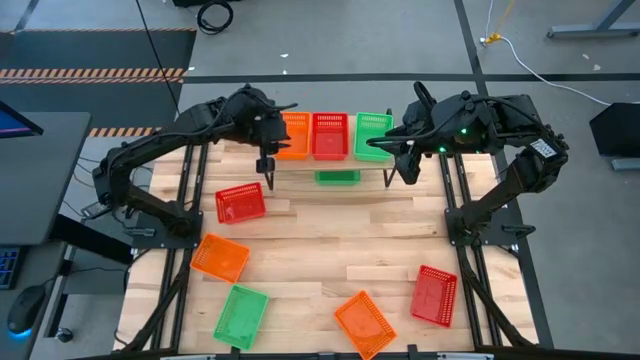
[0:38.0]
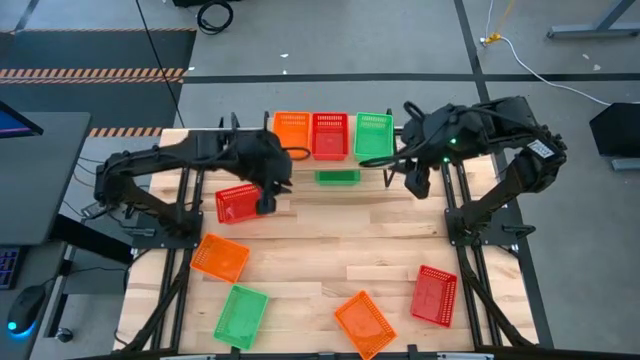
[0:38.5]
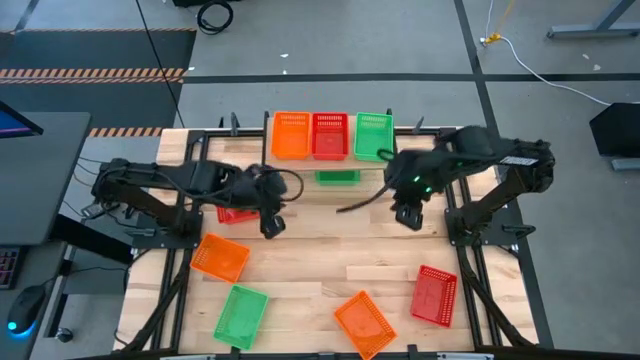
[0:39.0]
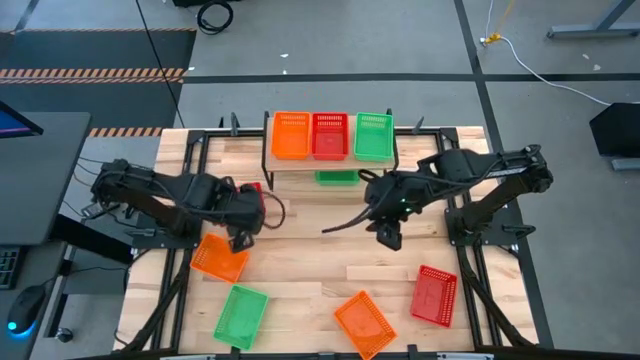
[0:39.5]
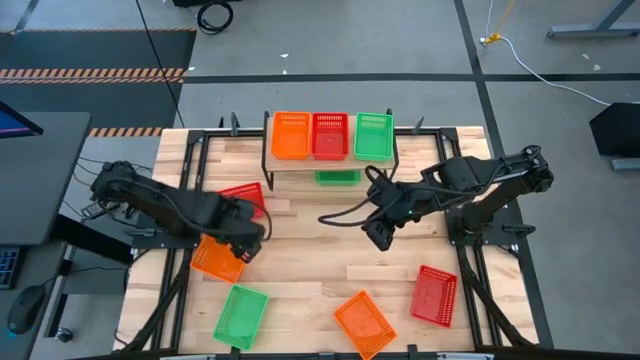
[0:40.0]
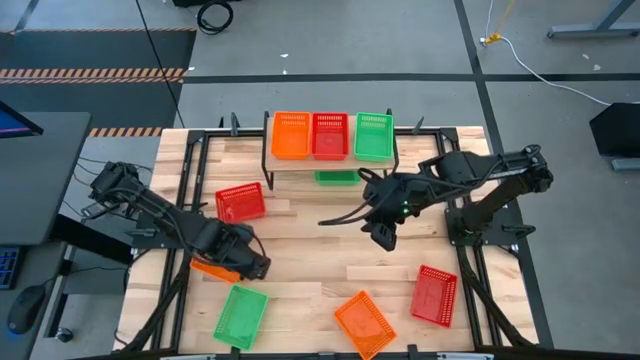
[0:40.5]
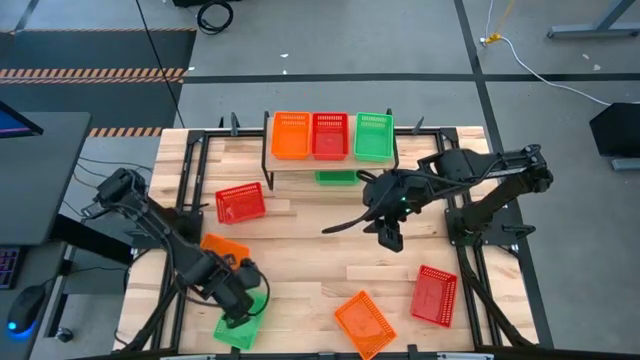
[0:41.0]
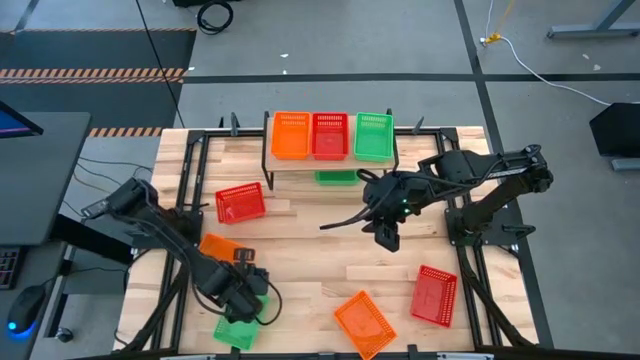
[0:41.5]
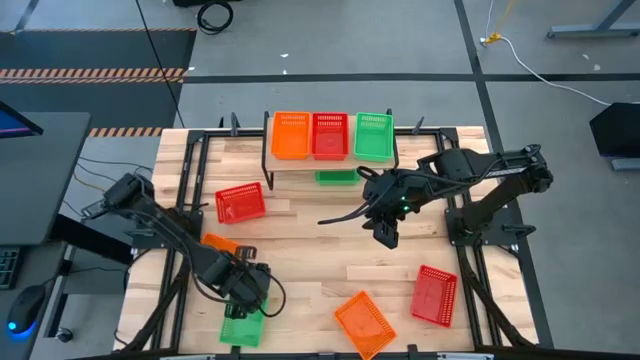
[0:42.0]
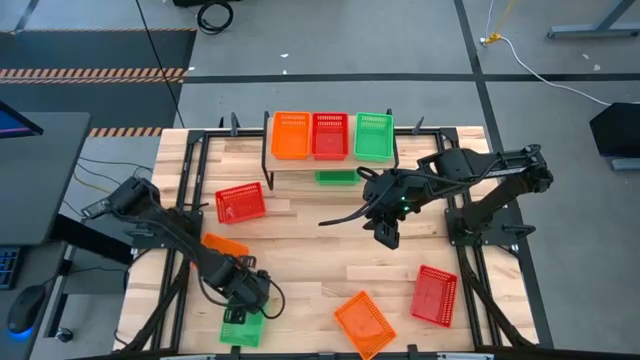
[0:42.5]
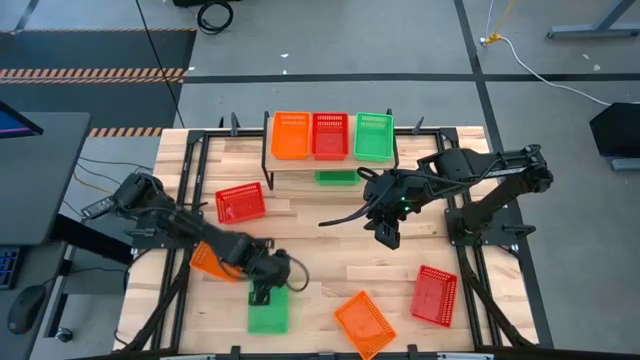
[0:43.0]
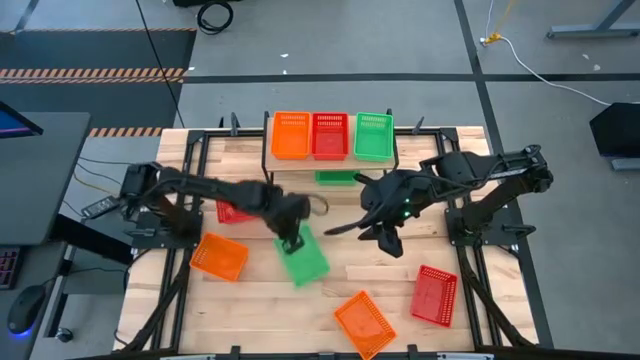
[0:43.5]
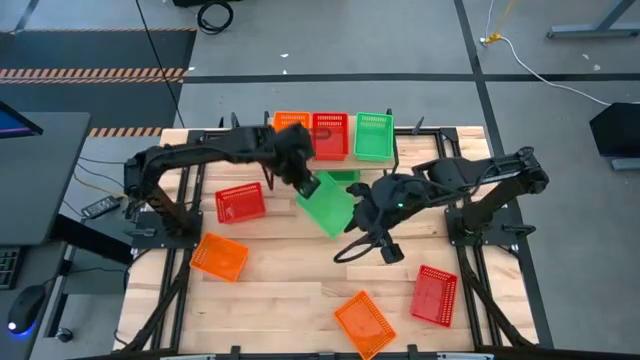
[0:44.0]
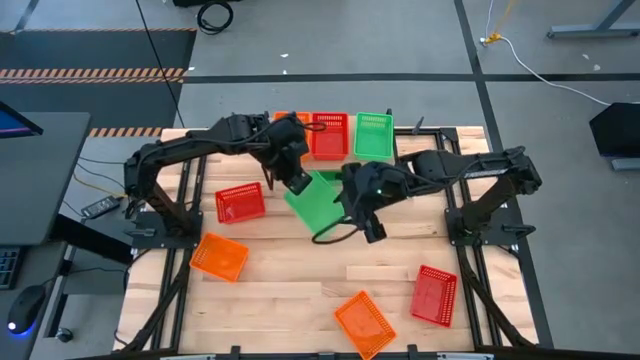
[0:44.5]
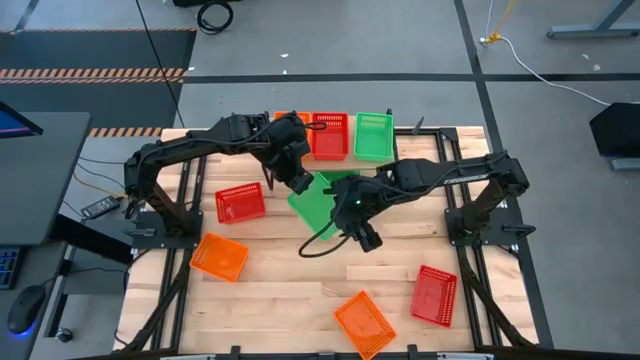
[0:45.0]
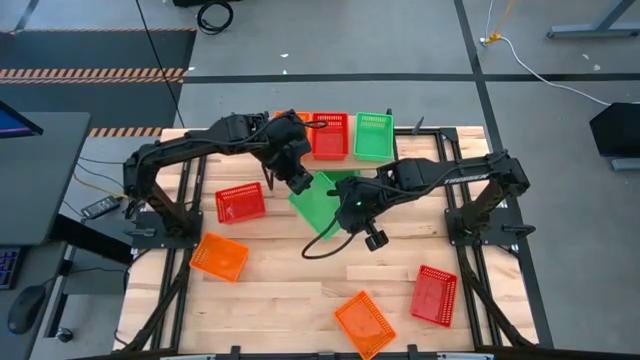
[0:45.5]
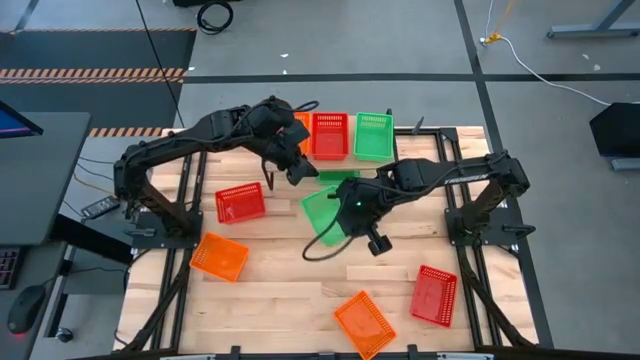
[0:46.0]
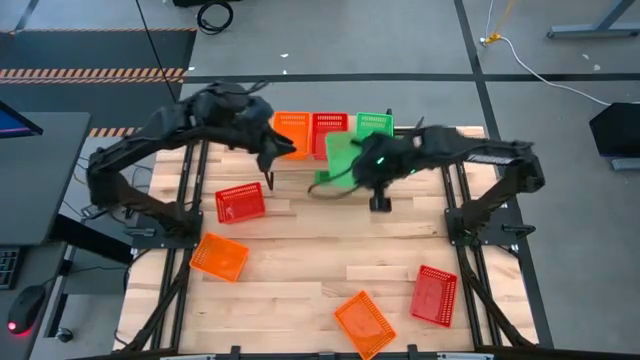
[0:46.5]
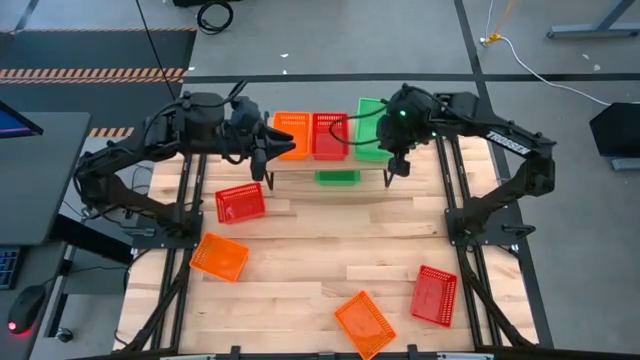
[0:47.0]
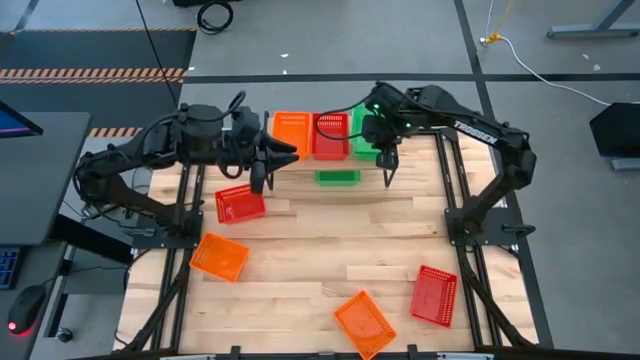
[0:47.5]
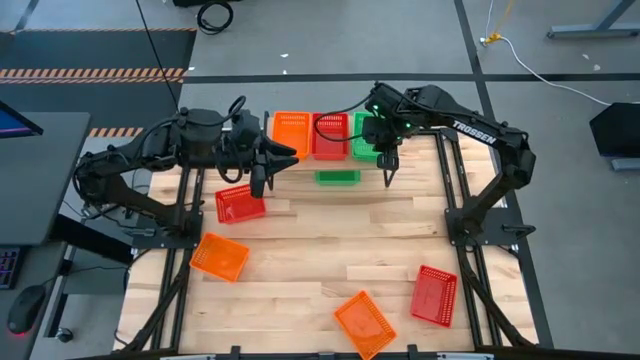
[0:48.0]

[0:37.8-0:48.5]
Task: Stack baskets on shelf by color
Stack the bottom green bin on top of the other green bin on the shelf

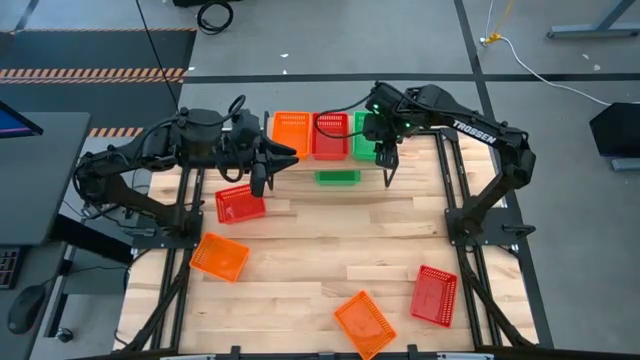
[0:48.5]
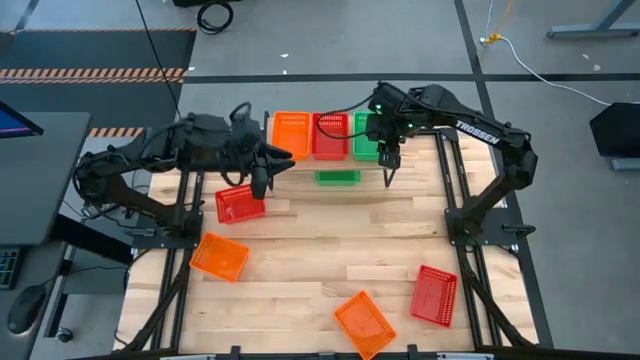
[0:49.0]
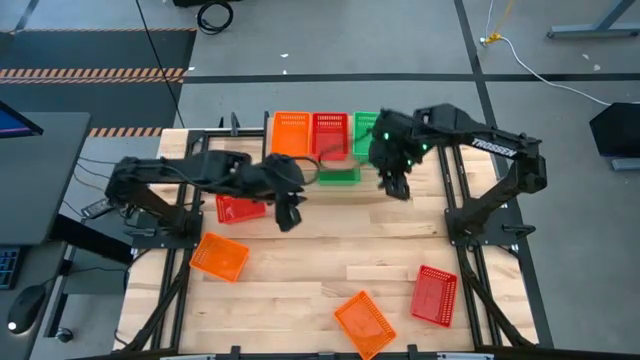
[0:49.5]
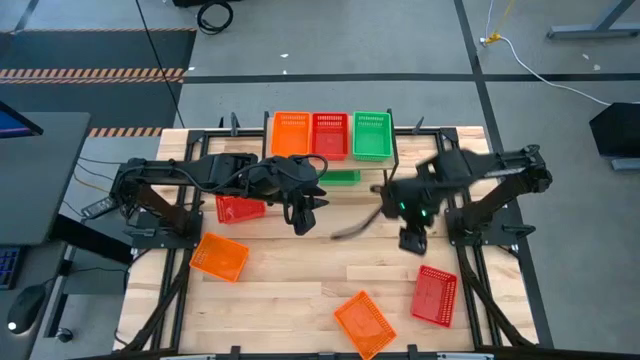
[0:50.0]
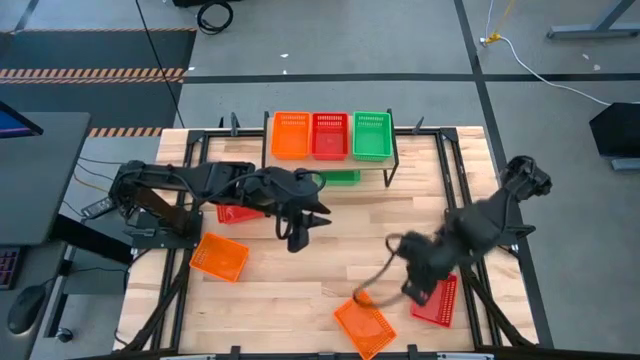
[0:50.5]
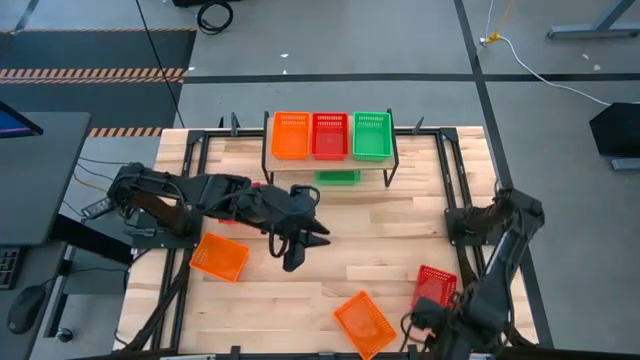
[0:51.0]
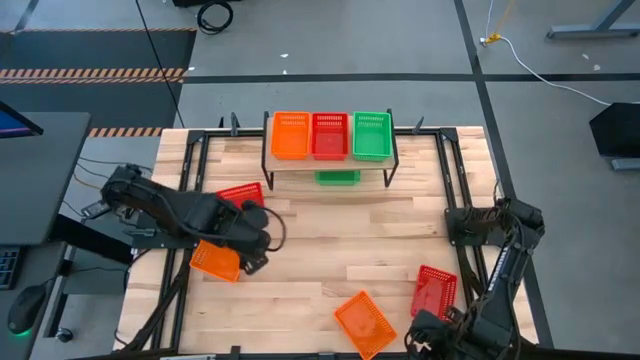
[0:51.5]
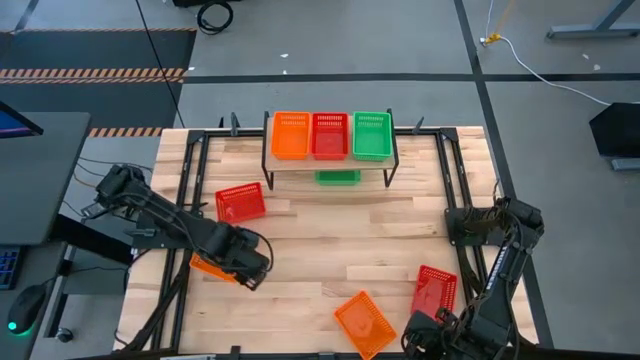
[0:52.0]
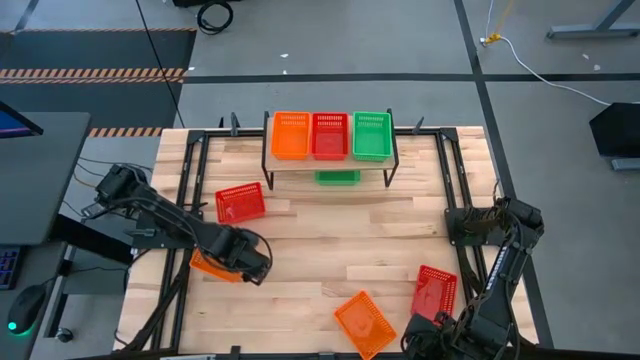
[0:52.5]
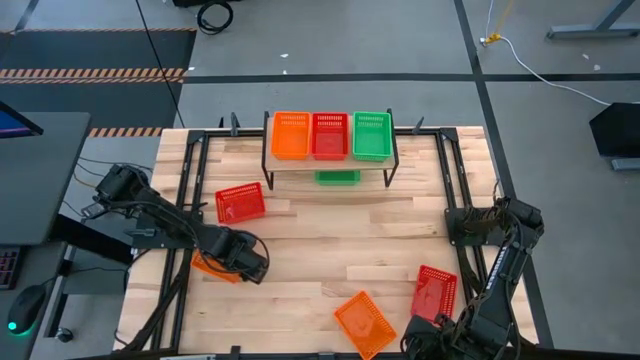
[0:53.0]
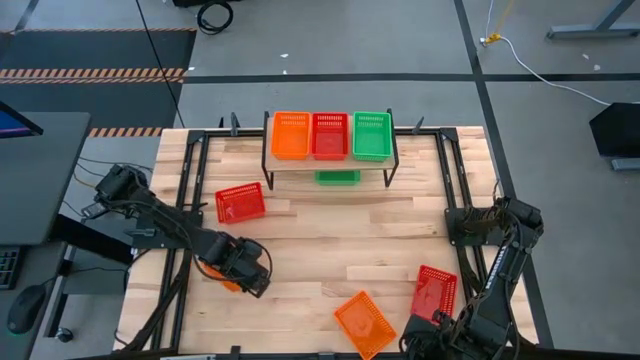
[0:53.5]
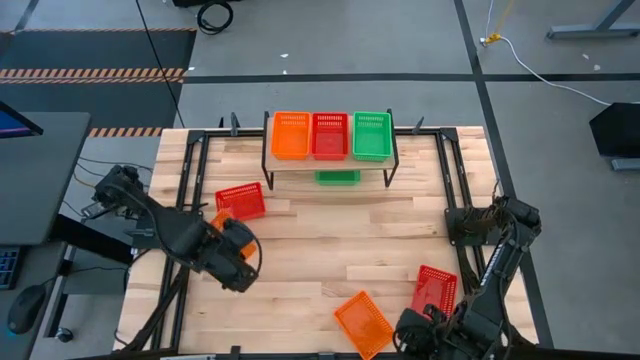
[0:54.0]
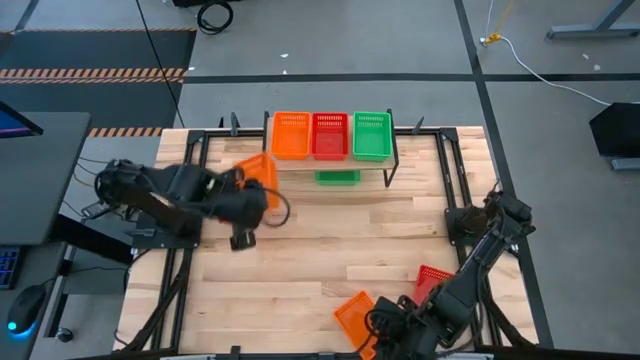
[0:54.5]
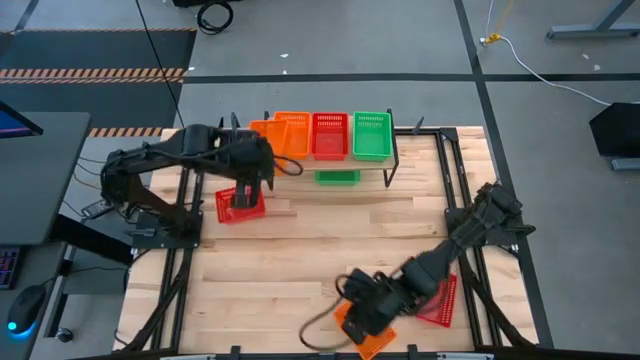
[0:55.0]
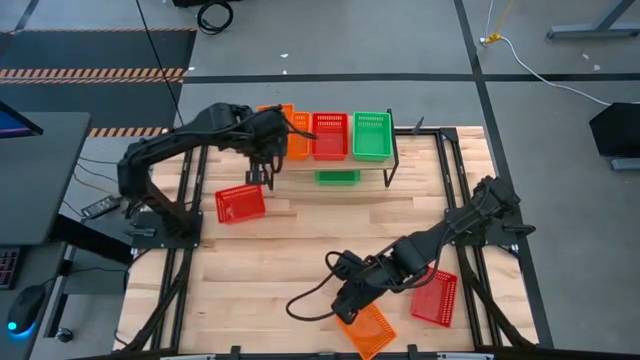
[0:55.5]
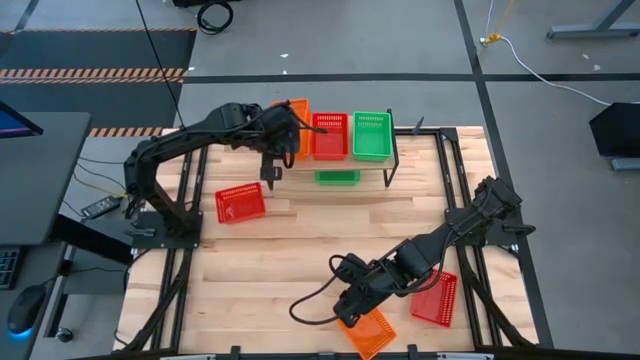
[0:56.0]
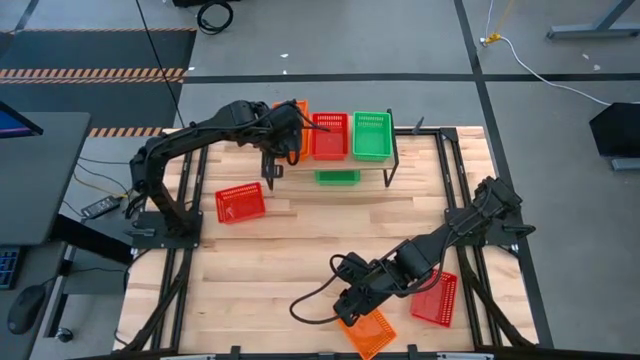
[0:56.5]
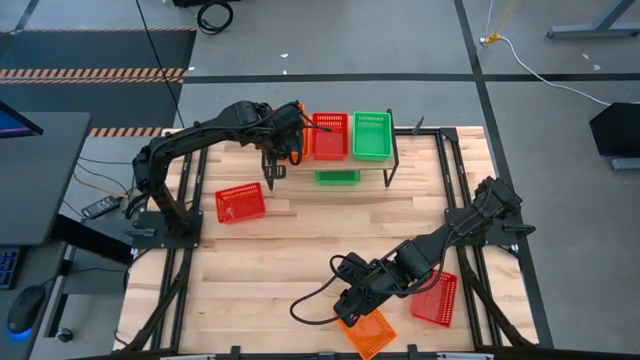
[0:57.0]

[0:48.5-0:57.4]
Stack the left orange bin on top of the other orange bin on the shelf

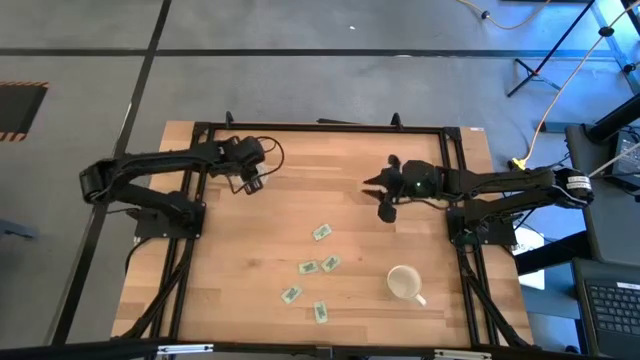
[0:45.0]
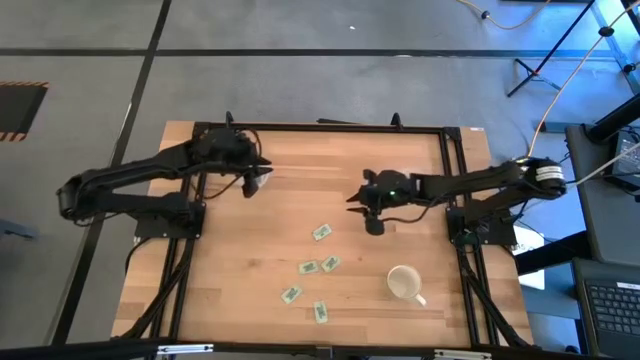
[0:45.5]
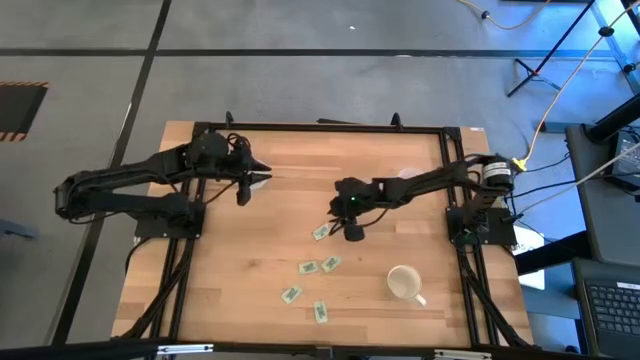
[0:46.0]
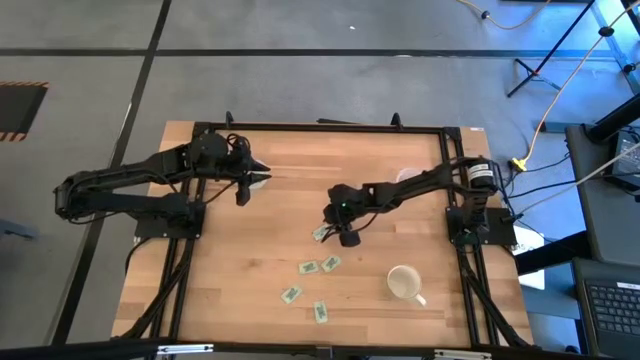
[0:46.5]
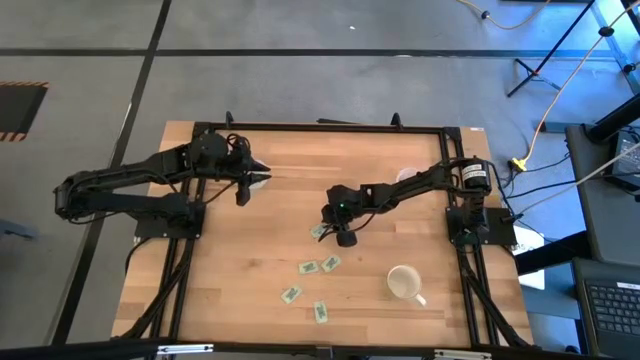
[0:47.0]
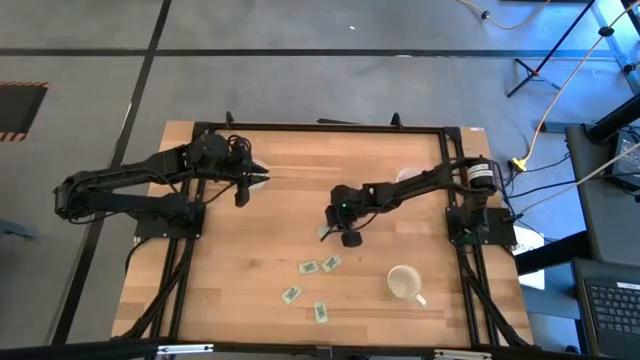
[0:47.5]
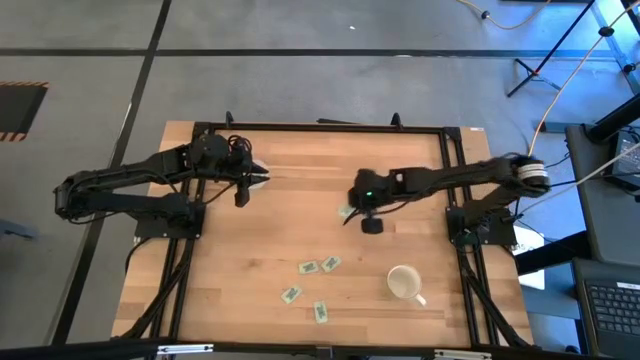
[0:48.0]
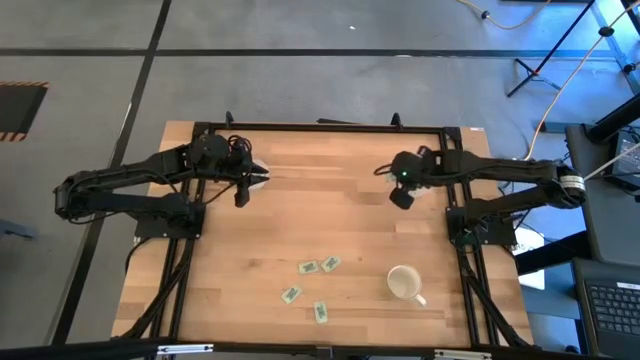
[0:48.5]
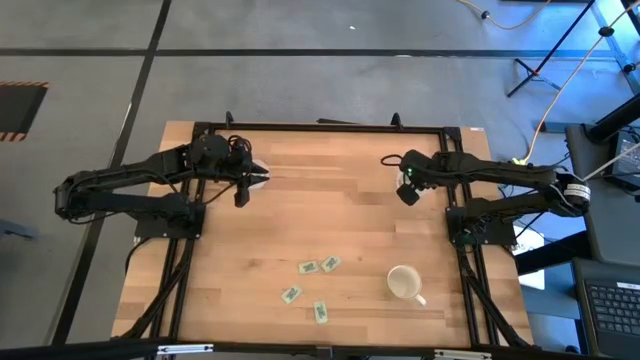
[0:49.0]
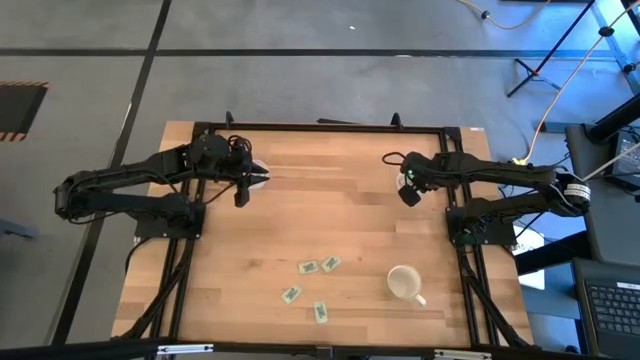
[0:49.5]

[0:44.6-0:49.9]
Task: Pick and place Stevia / Truvia into bins
Put the stevia packet into the right transparent container
